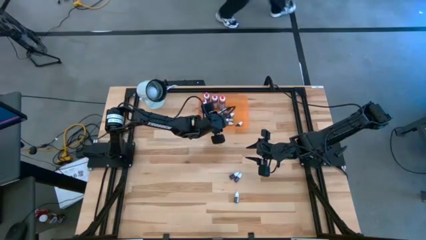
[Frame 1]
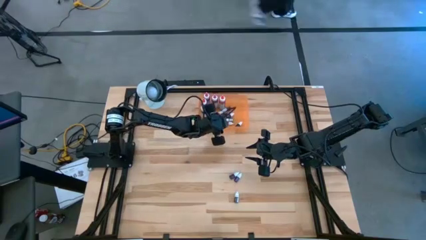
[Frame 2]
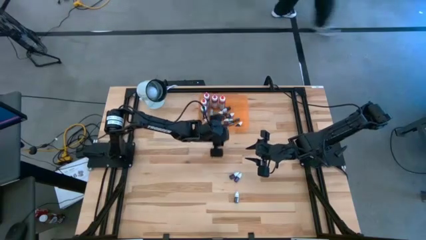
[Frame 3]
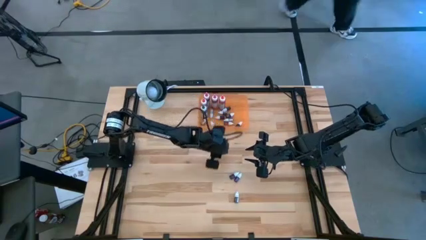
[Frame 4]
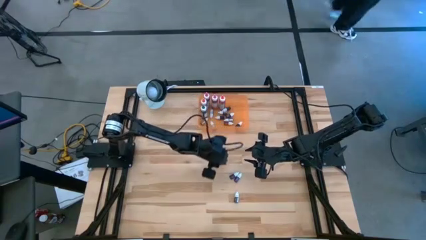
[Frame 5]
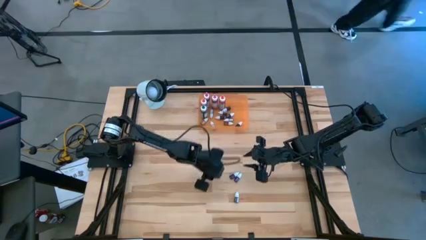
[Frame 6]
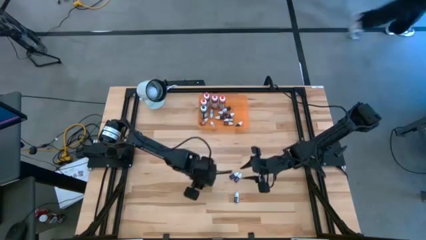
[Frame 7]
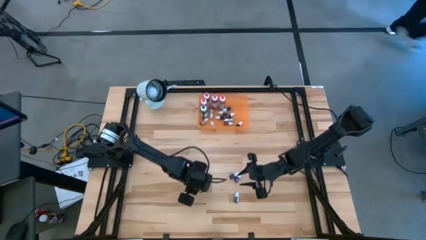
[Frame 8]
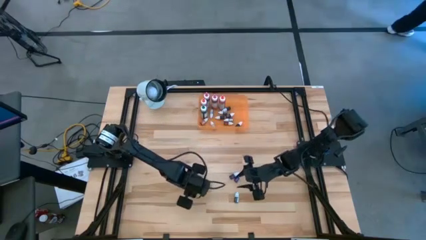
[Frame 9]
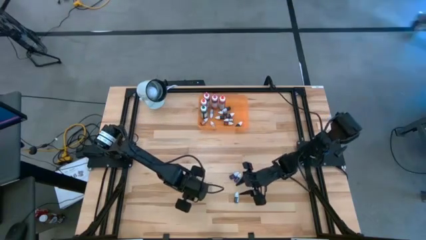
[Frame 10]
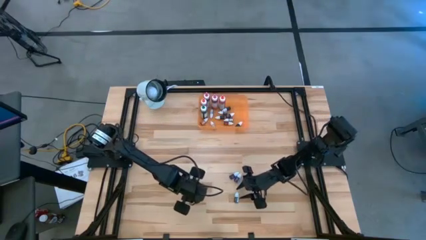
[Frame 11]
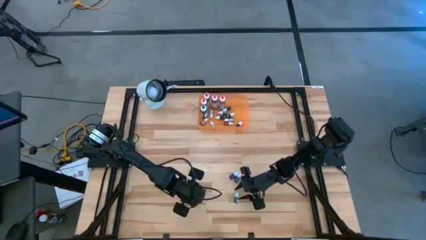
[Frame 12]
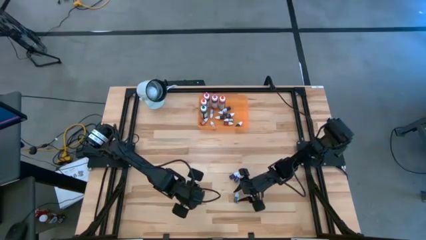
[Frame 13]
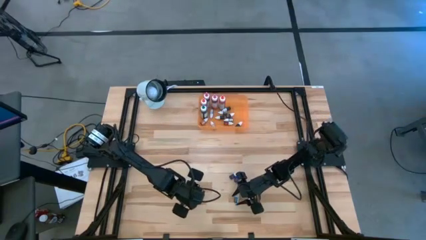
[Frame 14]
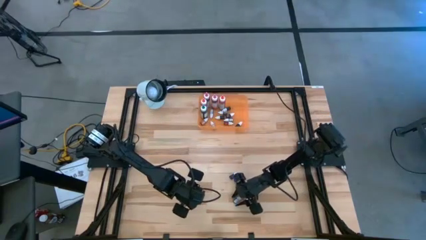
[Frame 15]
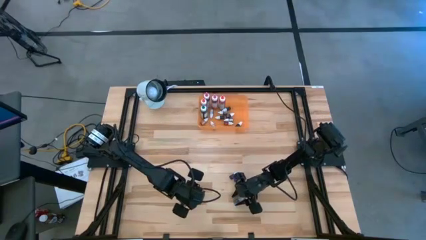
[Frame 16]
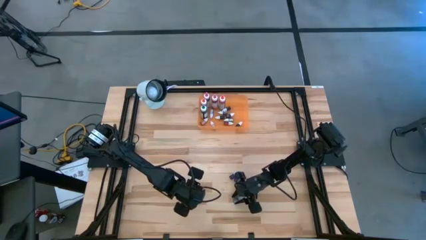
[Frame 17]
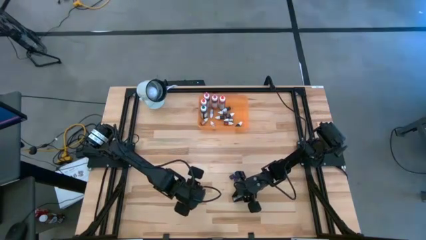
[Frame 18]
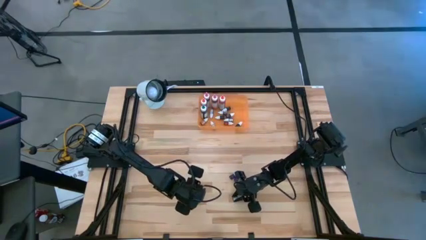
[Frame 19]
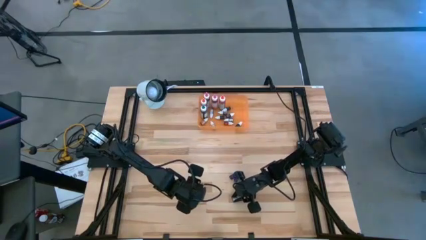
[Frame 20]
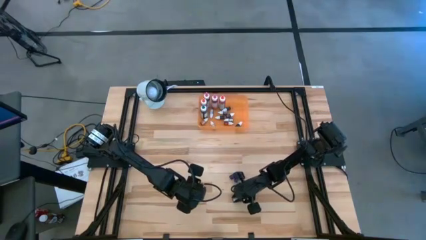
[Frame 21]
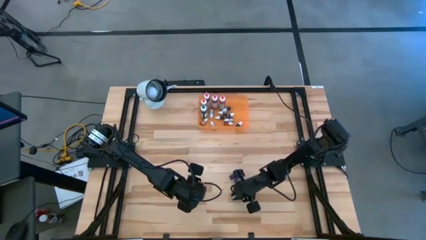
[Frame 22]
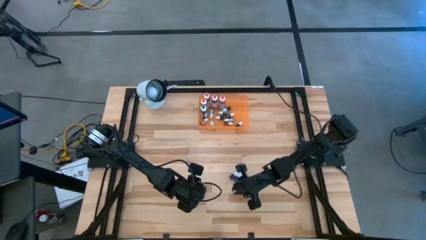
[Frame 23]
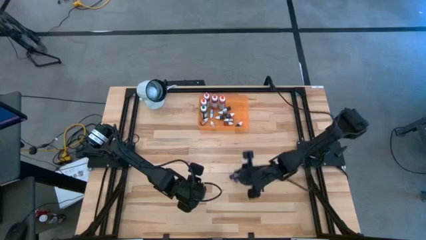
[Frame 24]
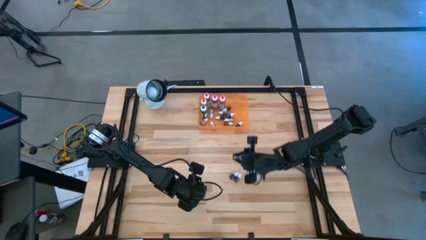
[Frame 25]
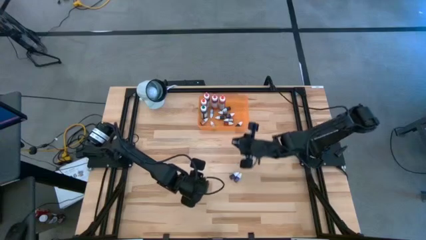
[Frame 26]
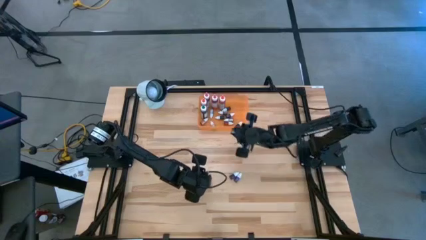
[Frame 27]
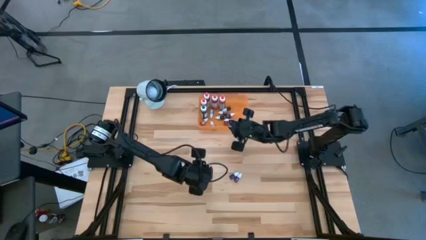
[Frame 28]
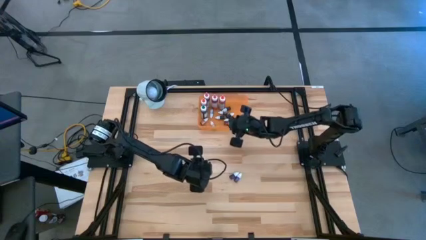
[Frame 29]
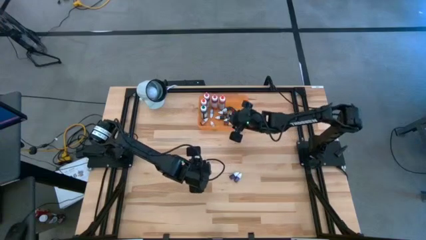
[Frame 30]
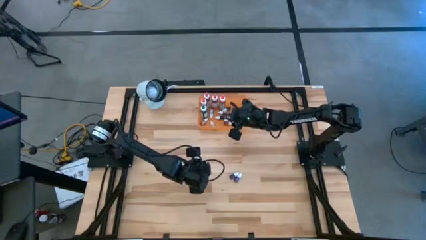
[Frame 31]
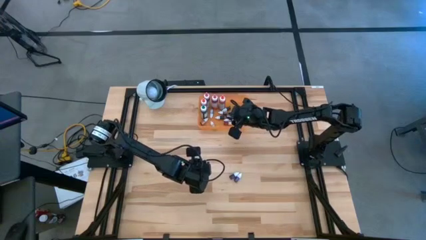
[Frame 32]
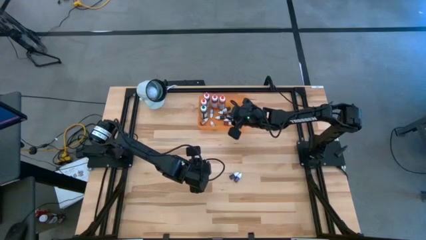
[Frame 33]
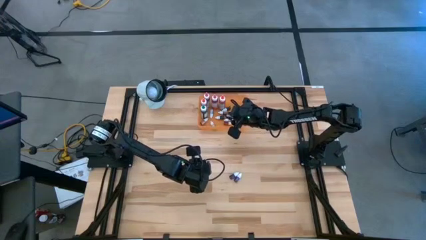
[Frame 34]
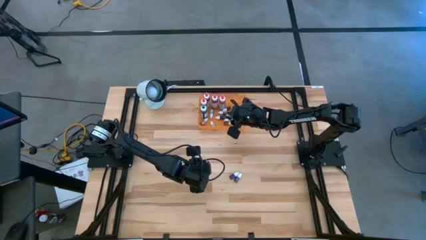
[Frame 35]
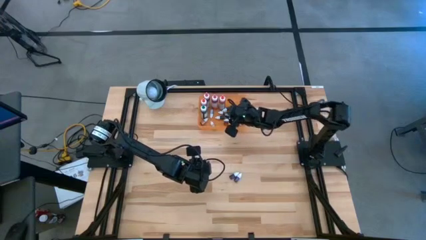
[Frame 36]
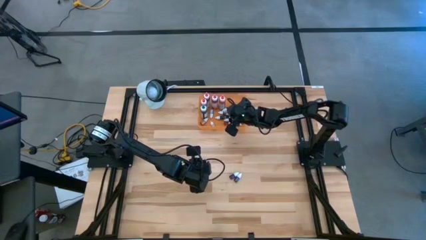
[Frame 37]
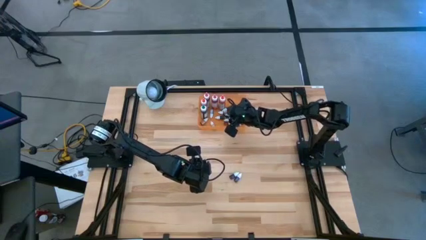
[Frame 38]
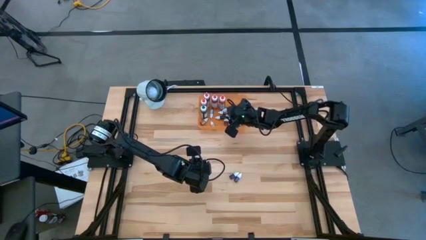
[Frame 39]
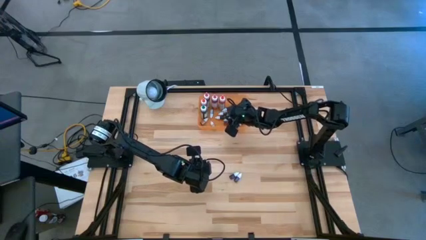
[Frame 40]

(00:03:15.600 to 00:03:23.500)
Task: Pick & Place food coloring
Put the dark green small food coloring bottle into the orange bin

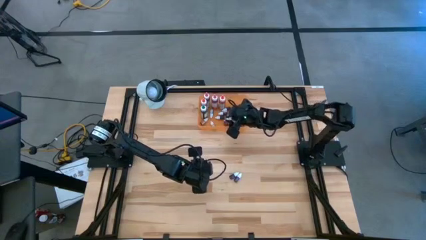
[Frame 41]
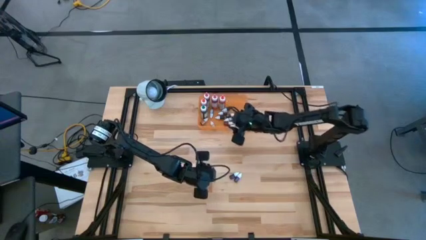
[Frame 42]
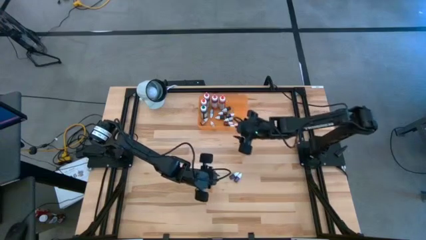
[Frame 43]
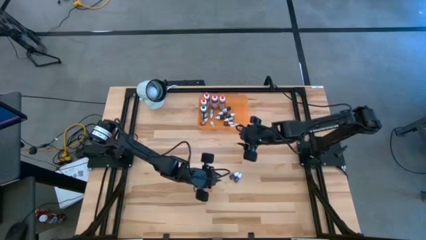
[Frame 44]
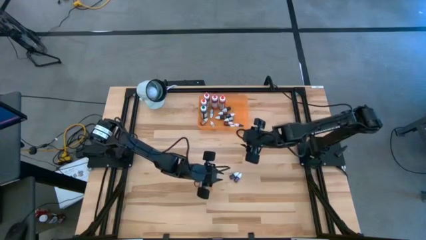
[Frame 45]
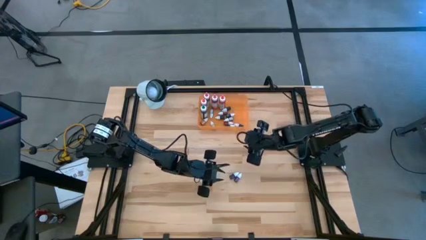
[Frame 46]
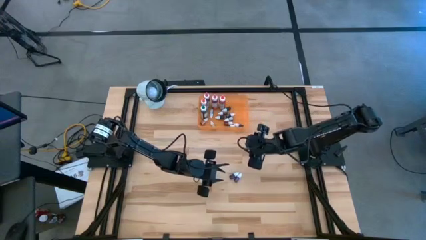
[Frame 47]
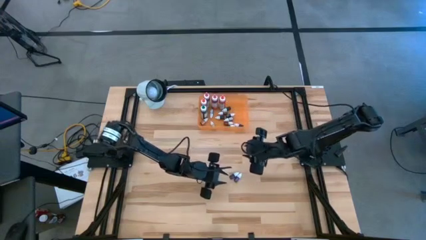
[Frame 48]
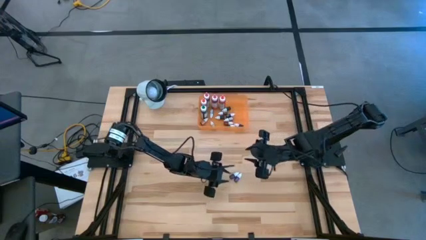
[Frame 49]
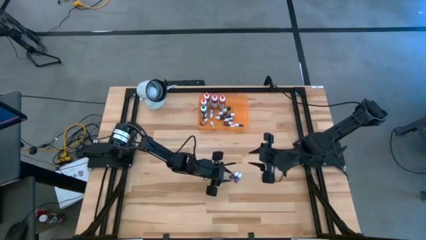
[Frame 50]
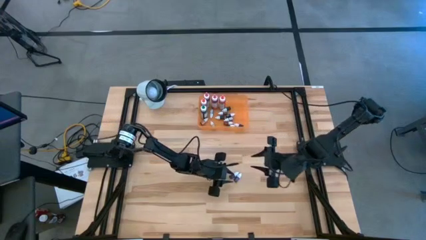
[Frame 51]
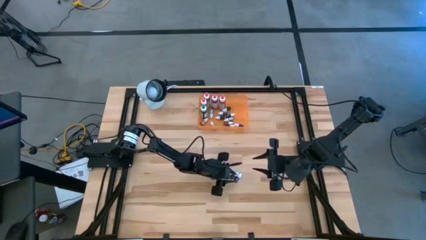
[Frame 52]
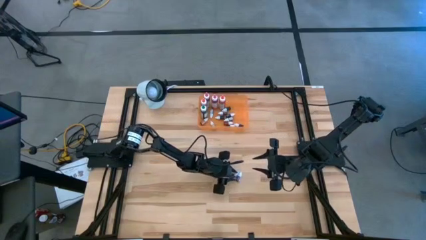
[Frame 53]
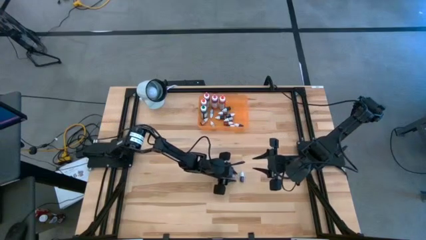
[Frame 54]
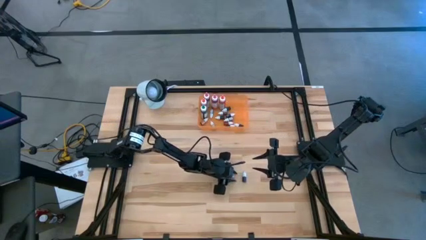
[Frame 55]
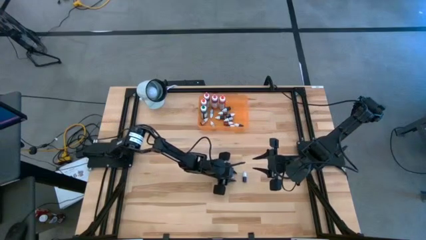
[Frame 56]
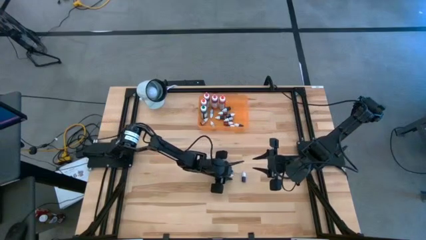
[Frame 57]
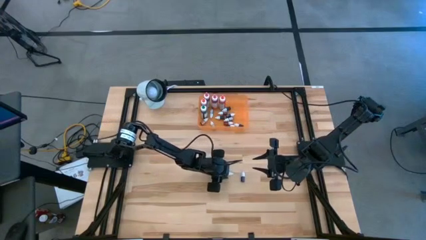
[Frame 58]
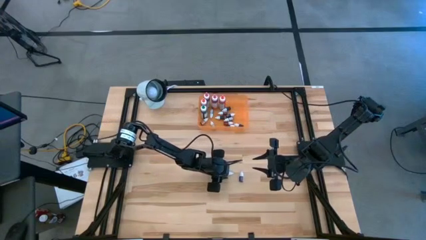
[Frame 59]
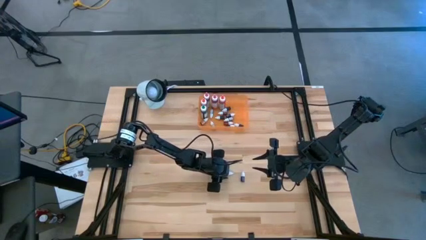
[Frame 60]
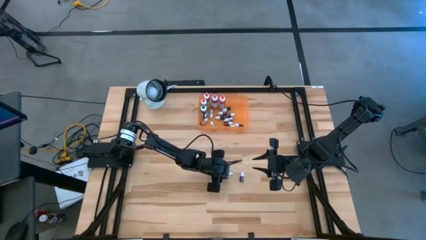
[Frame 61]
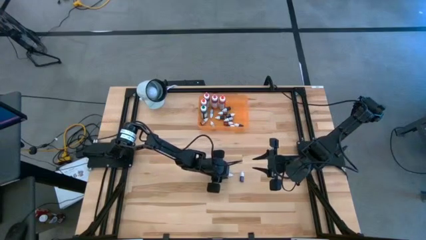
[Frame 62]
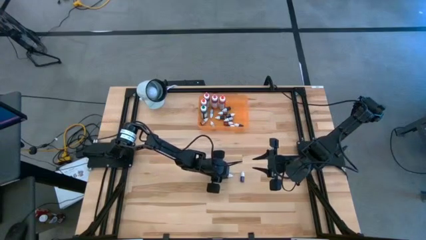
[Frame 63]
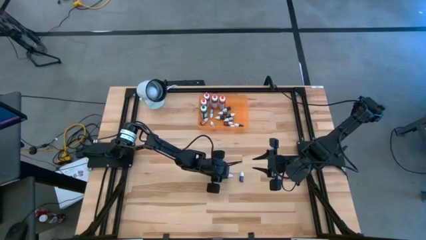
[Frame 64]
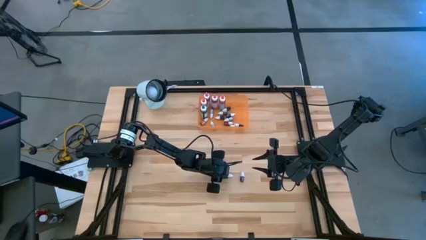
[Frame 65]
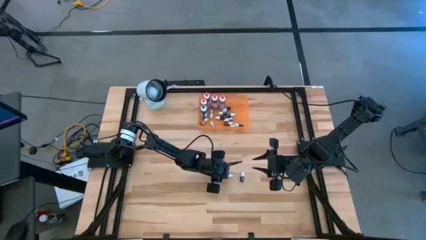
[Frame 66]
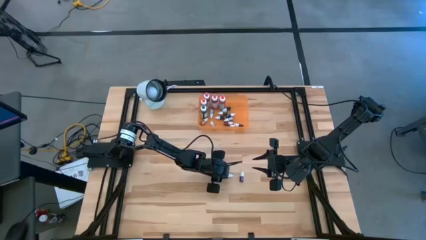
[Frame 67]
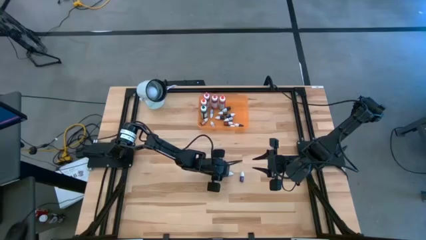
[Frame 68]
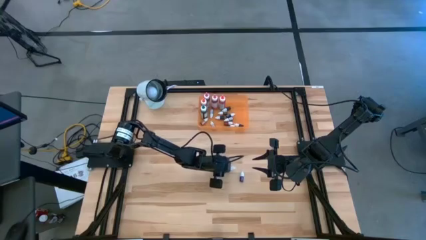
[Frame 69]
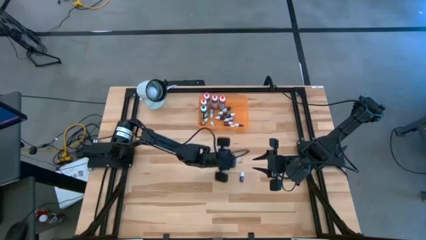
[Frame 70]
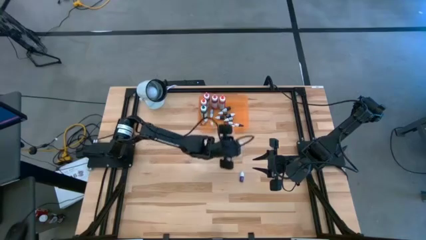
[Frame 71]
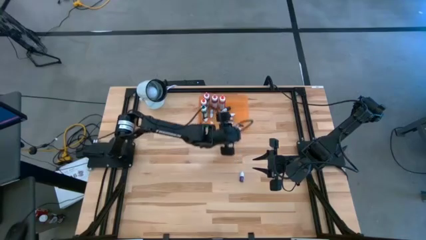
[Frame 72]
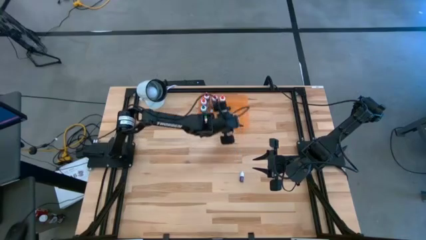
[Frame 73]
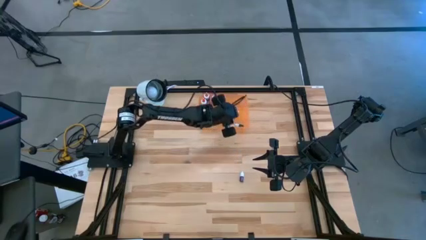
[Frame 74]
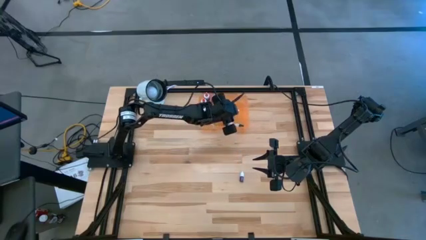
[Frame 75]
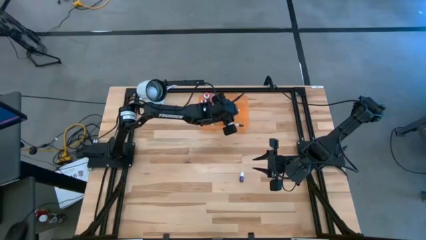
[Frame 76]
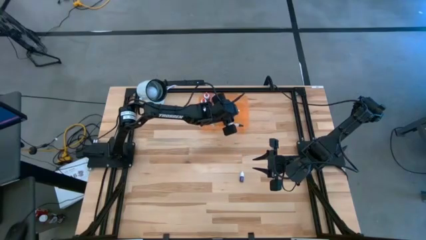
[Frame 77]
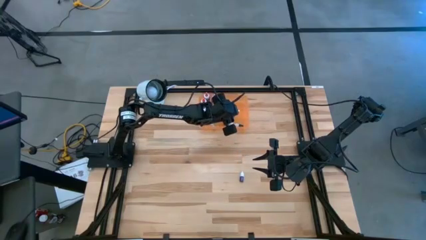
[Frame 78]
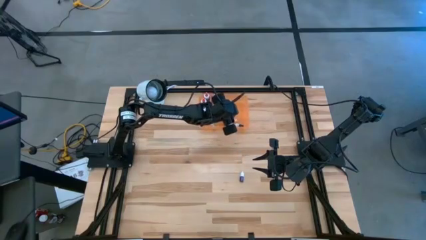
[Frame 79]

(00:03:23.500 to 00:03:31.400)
Put the purple small food coloring bottle into the orange bin
